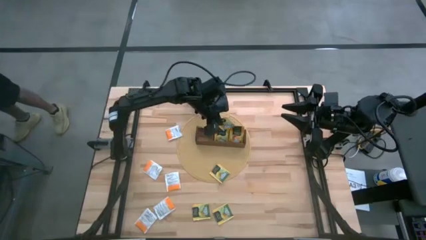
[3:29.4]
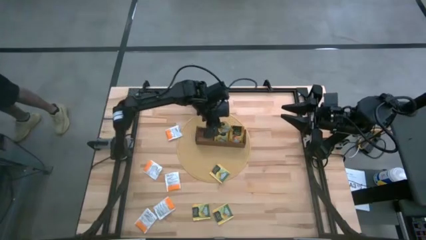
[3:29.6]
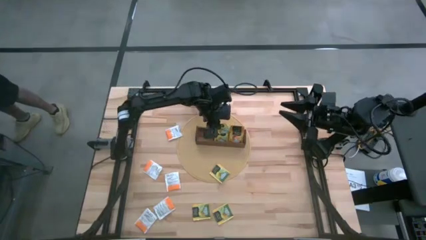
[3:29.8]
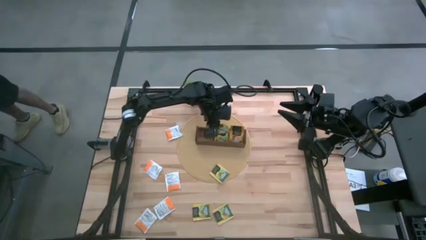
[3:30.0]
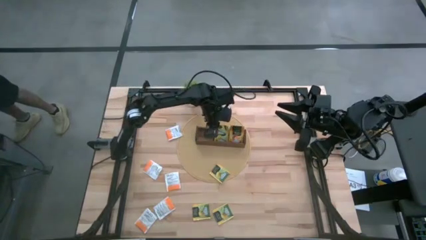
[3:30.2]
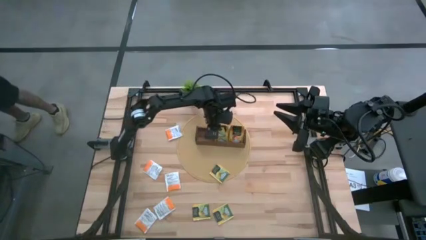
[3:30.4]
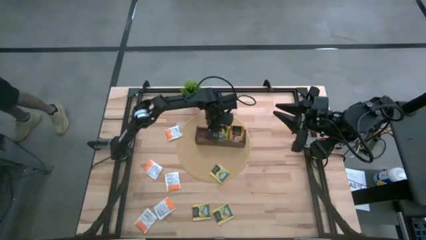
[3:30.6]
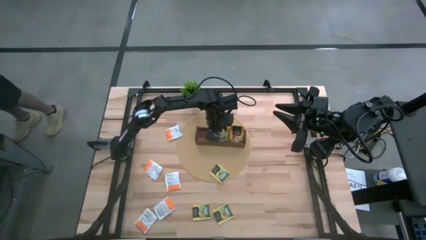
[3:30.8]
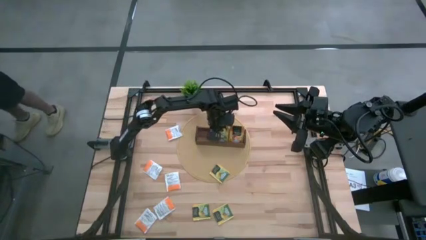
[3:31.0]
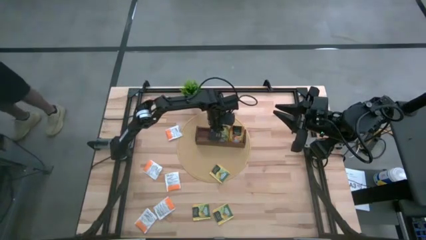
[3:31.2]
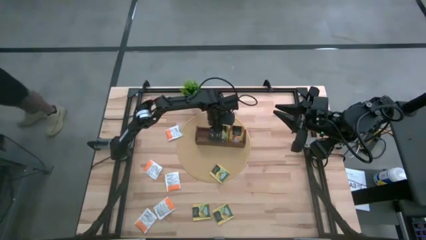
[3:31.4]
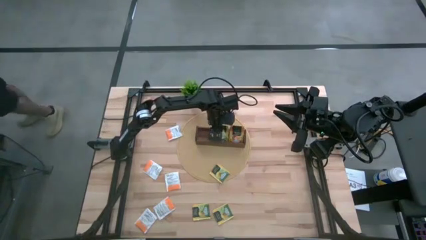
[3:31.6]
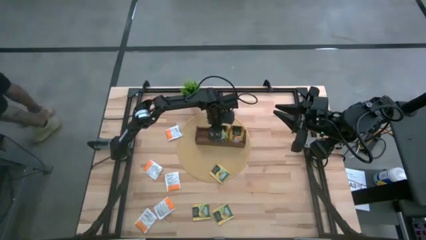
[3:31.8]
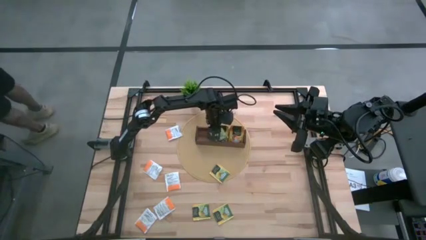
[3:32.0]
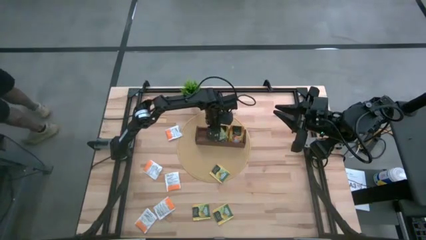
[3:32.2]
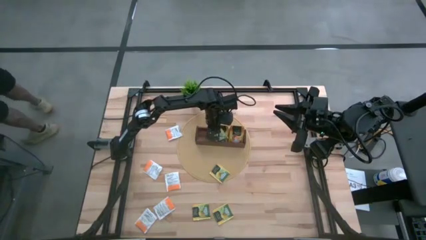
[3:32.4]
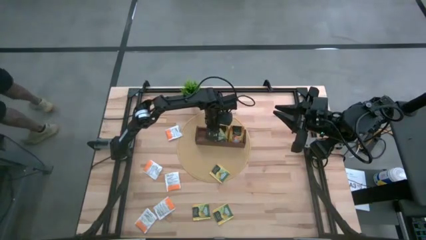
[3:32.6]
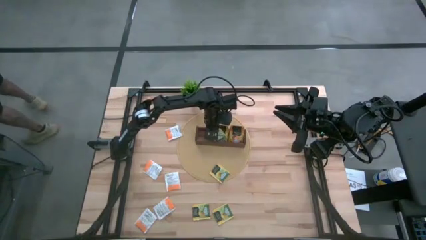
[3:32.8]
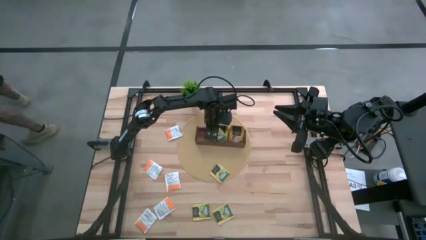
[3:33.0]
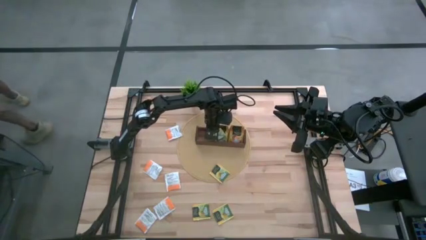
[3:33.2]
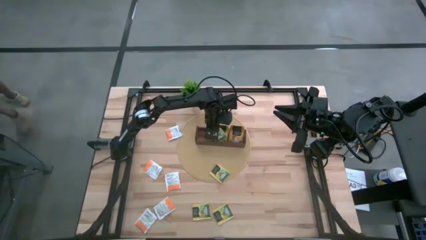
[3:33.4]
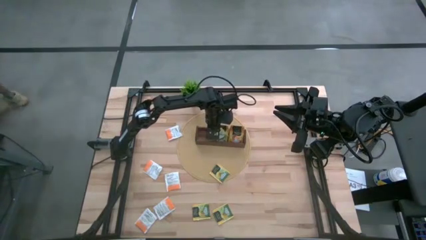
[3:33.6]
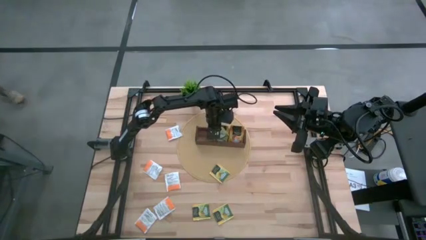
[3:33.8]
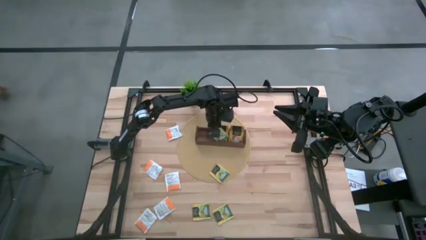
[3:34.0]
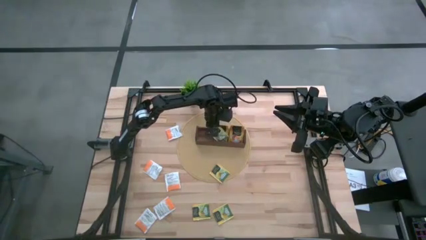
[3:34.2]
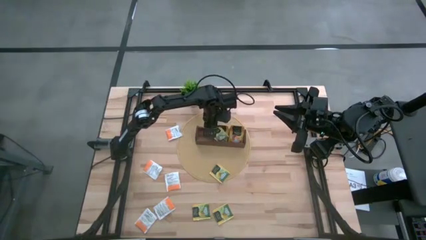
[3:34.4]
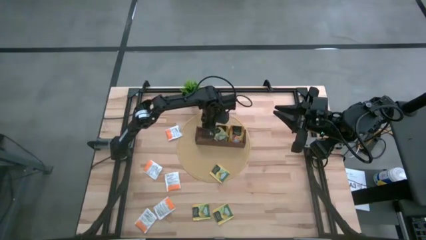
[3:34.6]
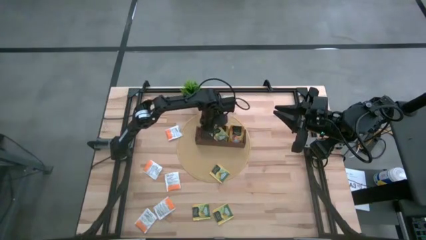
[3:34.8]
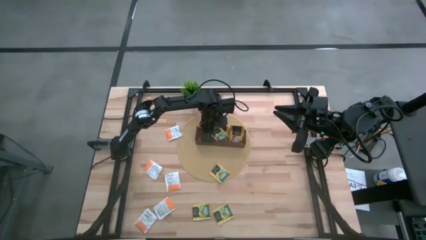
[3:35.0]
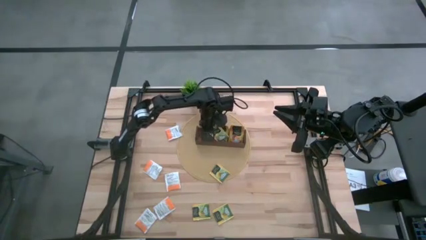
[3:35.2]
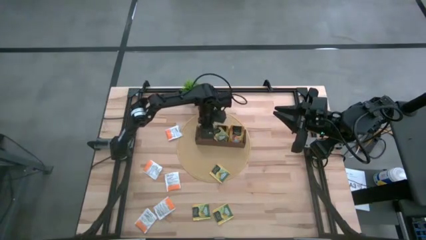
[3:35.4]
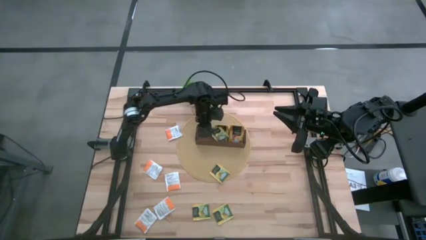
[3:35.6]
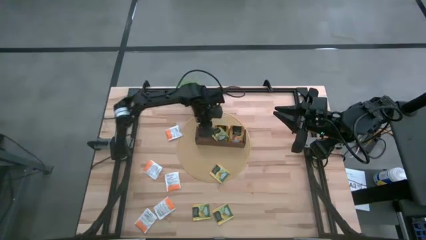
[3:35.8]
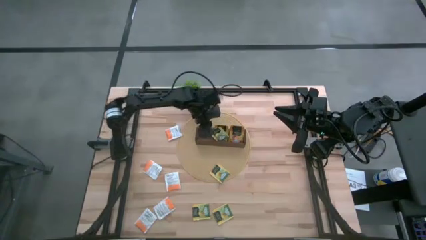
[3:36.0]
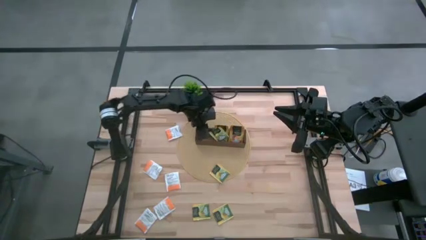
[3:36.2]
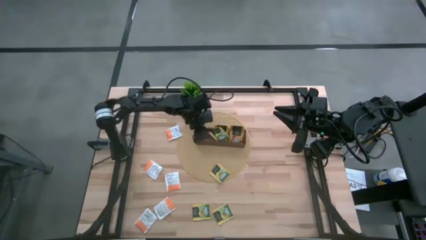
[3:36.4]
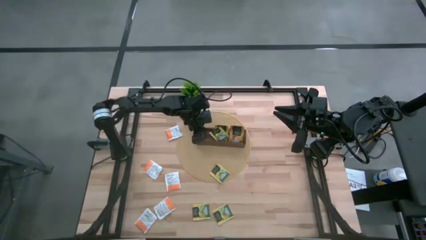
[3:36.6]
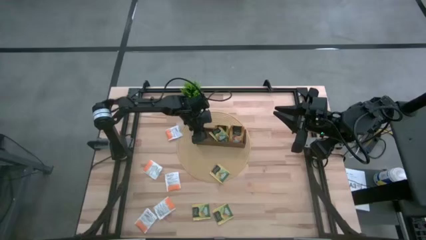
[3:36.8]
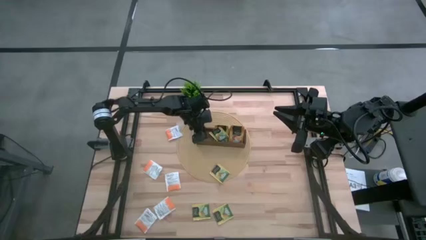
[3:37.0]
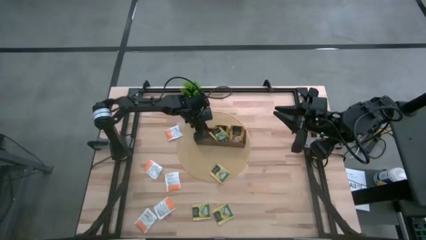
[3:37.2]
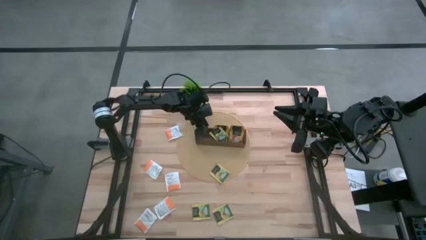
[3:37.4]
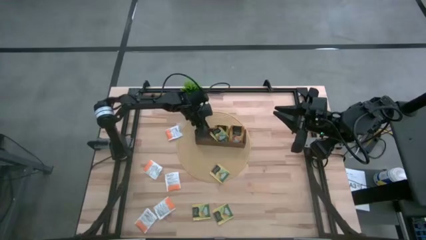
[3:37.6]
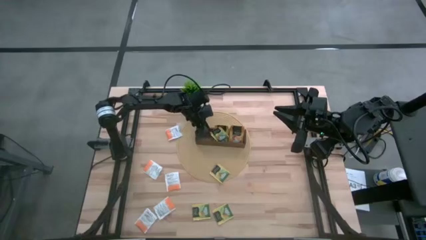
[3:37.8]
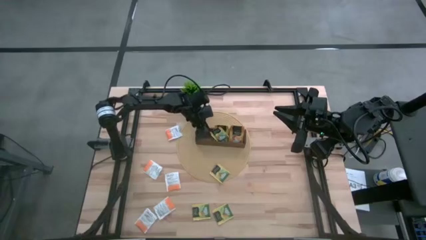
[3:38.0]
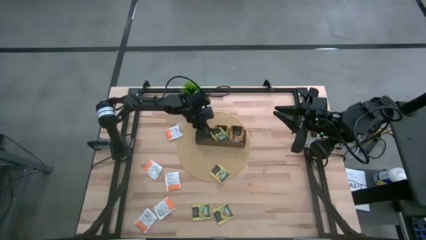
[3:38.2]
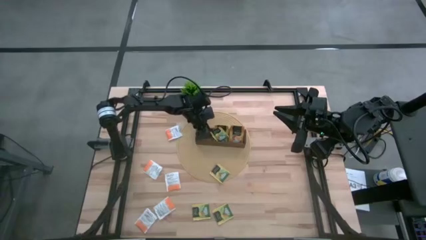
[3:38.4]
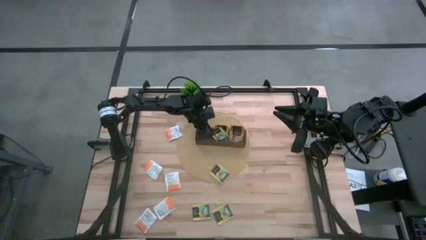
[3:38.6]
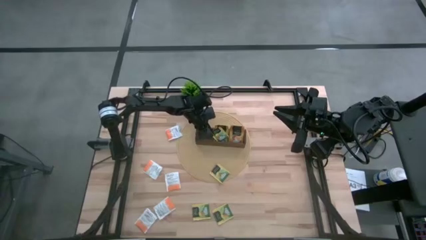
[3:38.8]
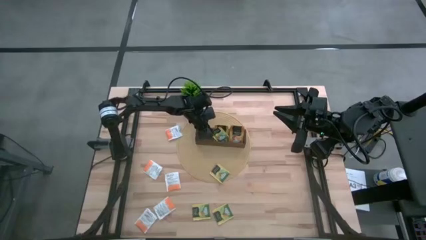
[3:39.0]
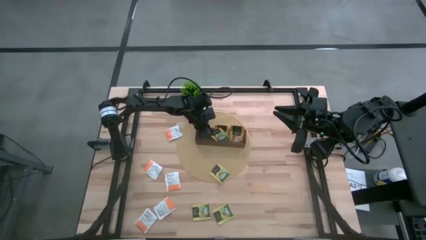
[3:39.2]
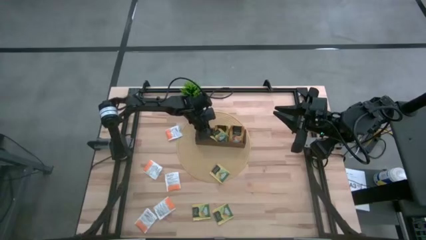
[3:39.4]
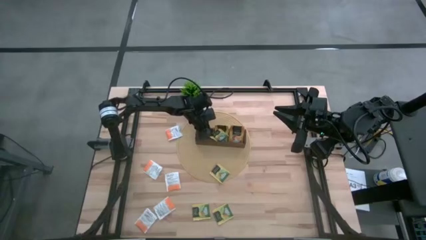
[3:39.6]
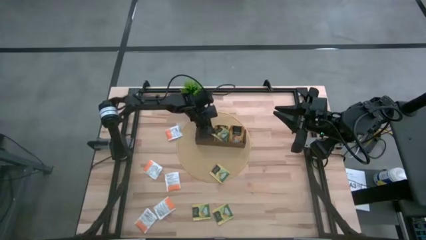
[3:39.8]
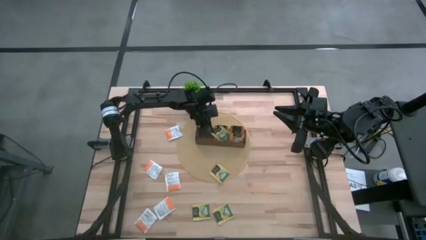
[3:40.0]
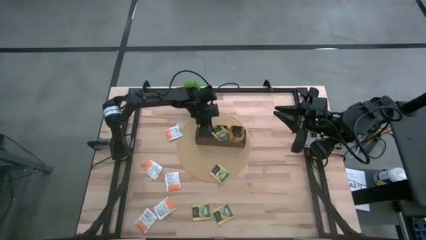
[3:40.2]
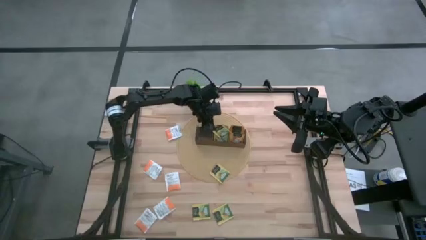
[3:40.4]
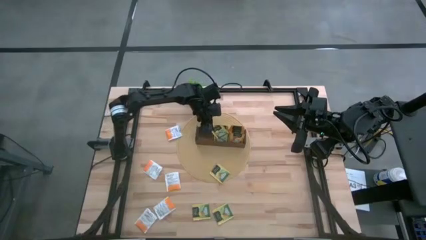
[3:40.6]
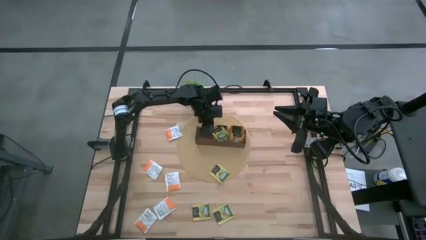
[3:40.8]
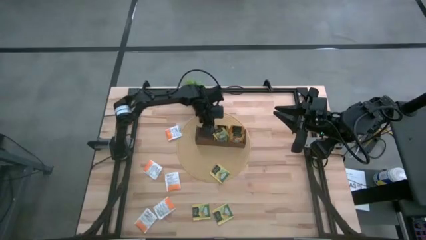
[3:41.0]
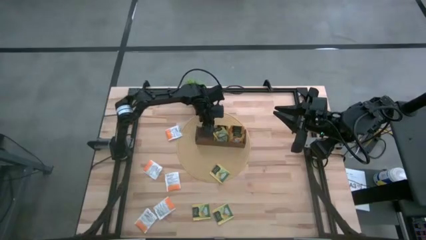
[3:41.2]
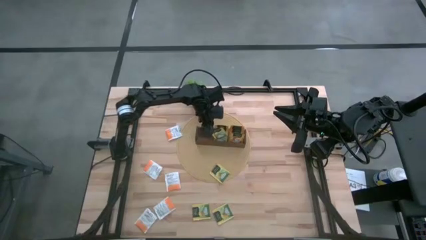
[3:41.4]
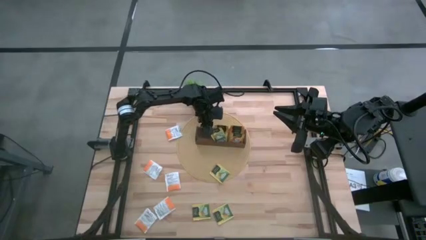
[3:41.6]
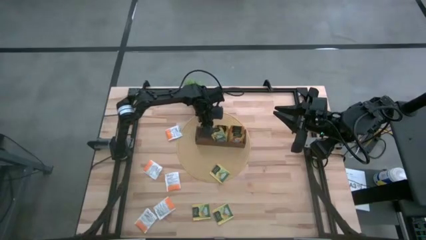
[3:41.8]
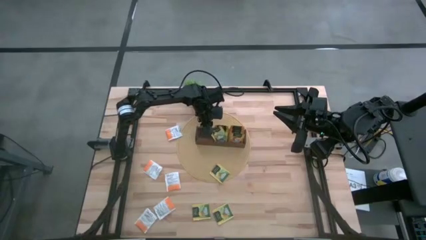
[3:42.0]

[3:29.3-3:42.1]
Task: Pick & Place Tea
Put the yellow tea bag into the middle section of the wooden organizer

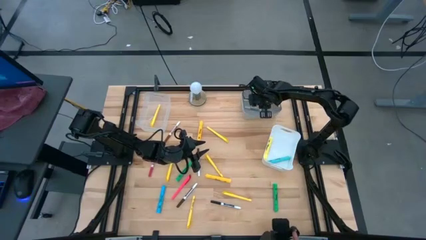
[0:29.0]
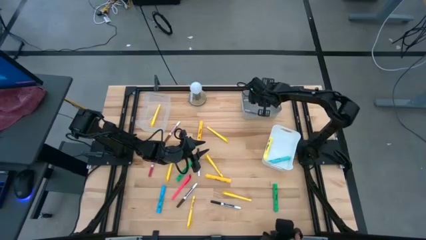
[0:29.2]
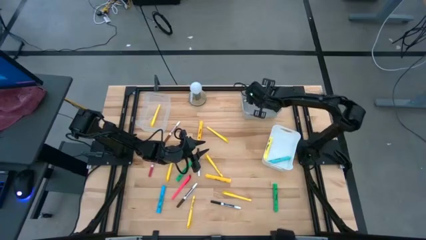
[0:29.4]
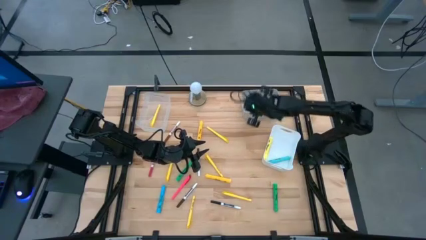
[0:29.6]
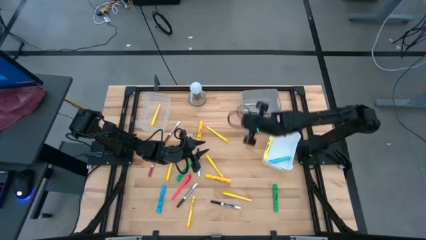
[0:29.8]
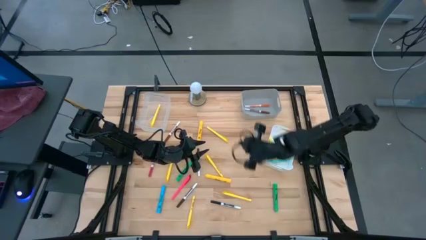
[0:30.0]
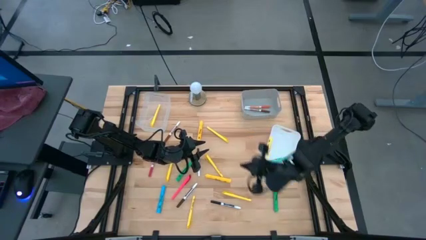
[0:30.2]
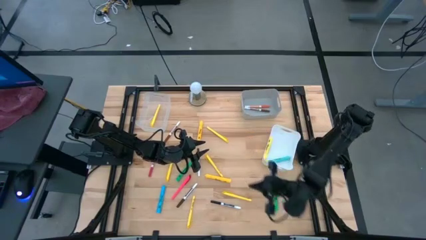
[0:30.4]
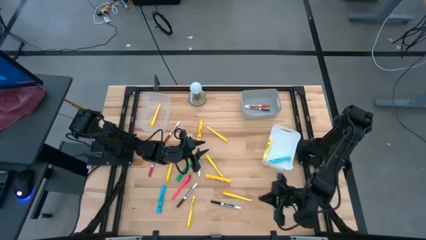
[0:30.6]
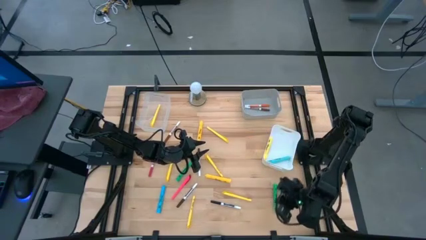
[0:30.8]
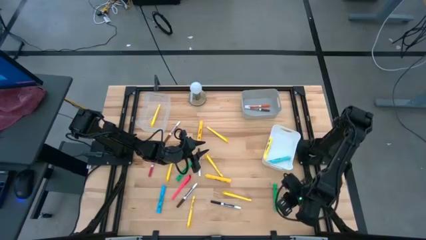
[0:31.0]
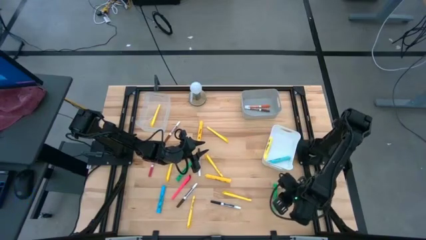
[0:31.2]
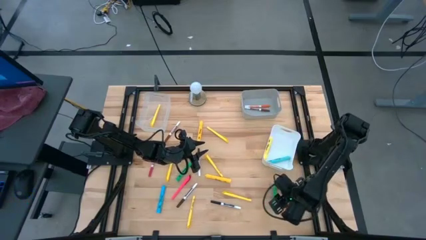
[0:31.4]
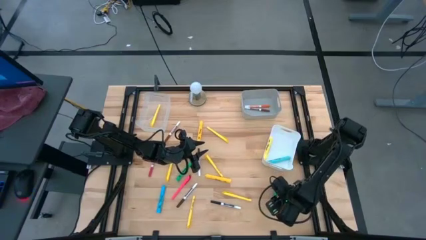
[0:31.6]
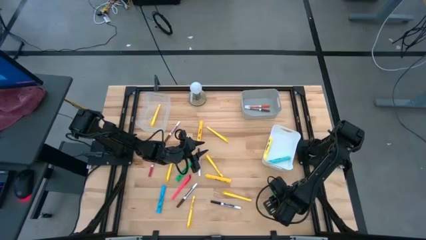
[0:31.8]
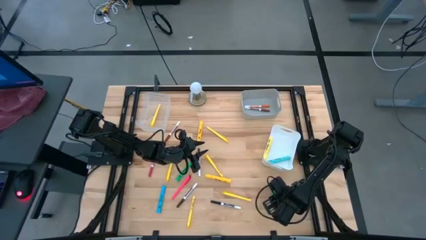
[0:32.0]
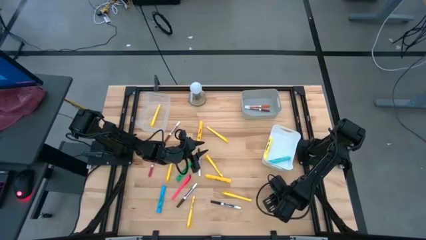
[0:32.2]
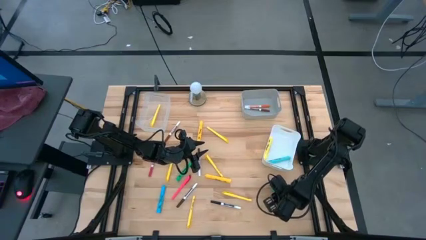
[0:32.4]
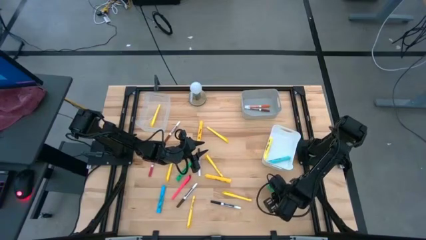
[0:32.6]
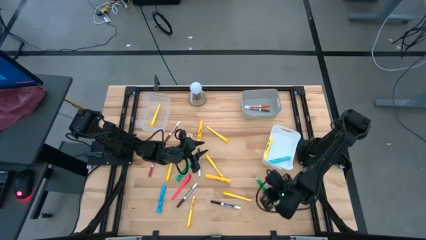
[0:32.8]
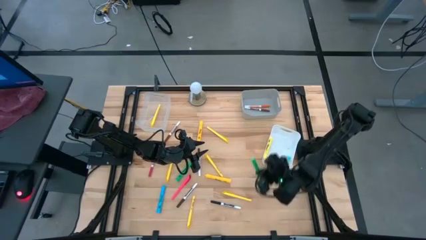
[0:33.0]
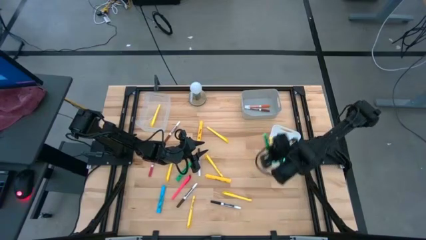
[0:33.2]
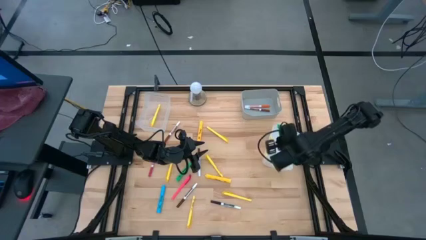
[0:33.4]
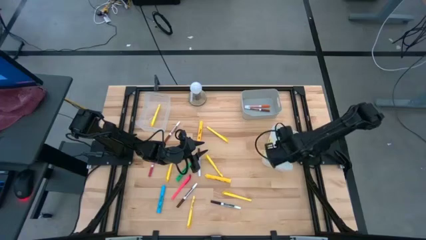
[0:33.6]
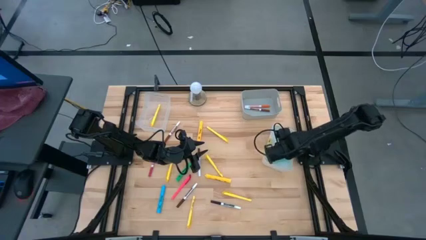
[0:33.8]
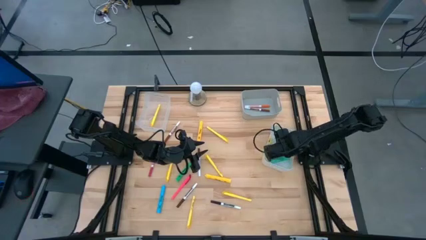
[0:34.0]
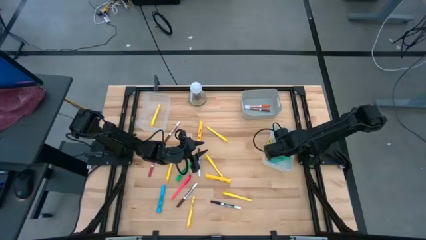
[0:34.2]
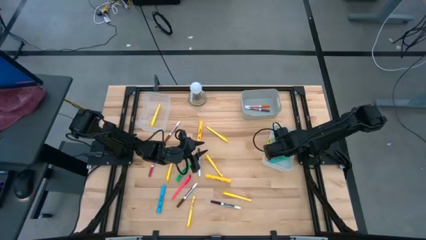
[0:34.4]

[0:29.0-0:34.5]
Task: Pick & Place Markers
Put the right green highlighter pen into the white bin
